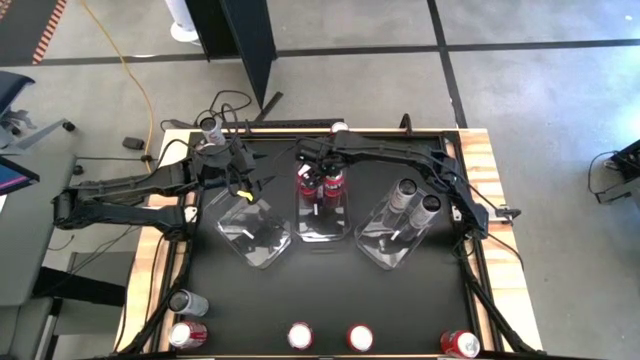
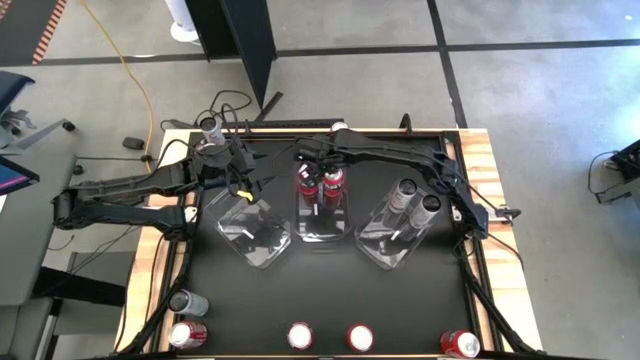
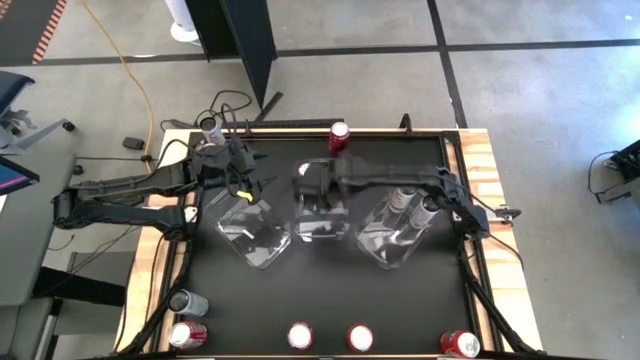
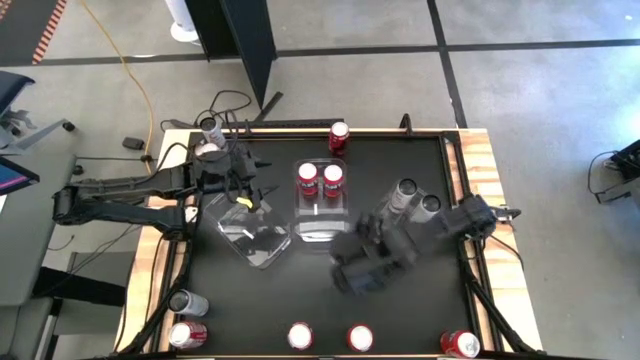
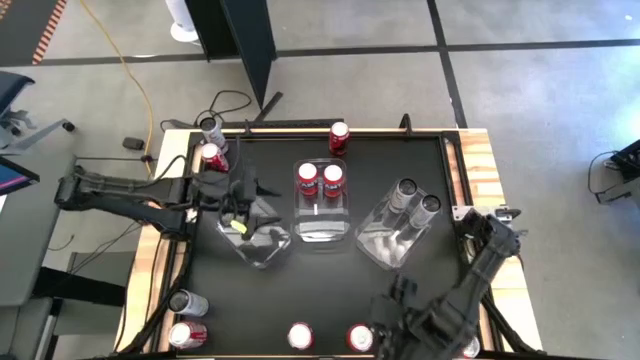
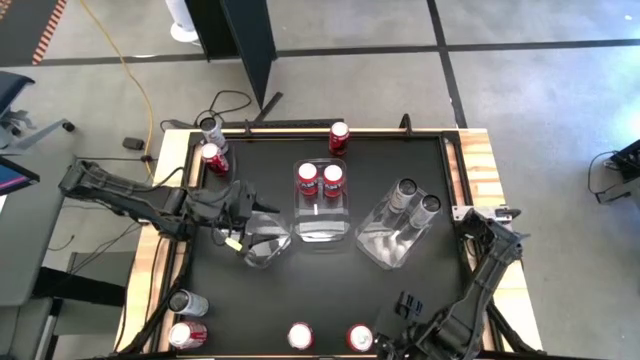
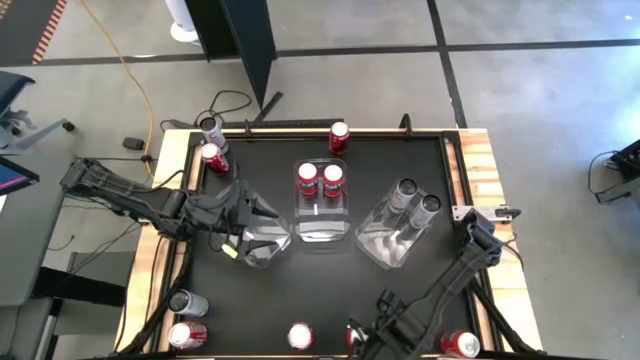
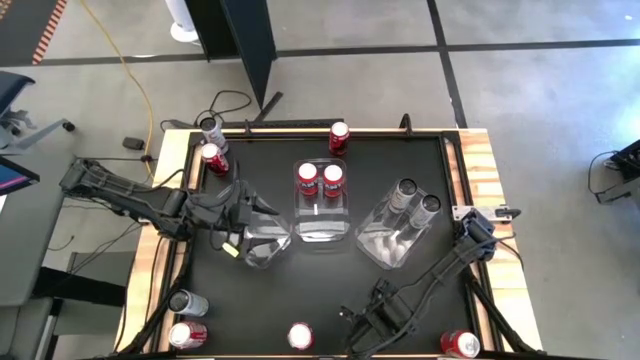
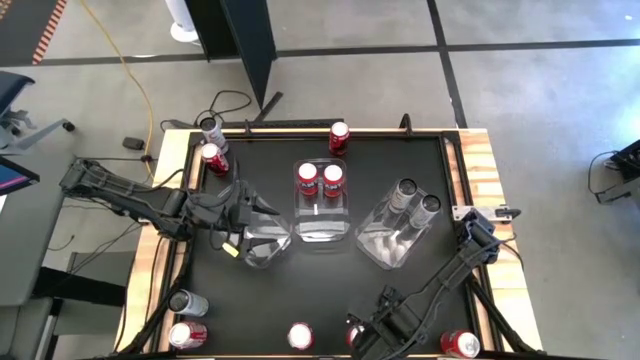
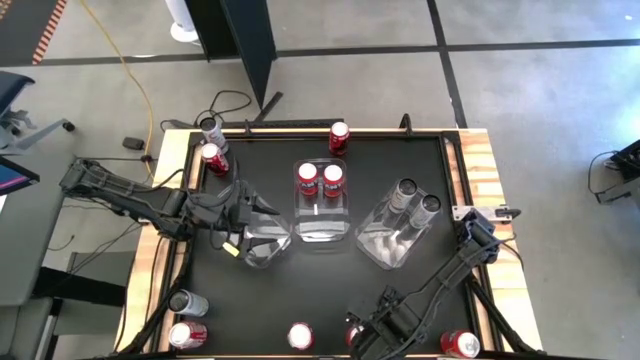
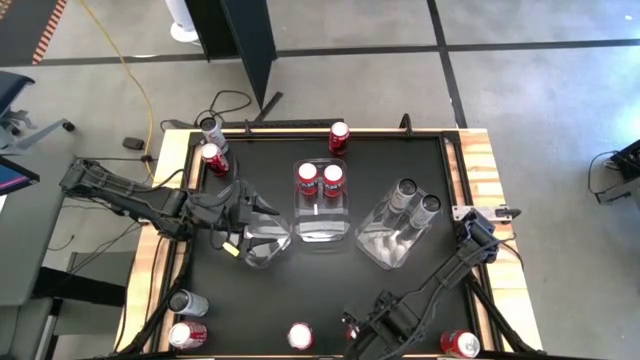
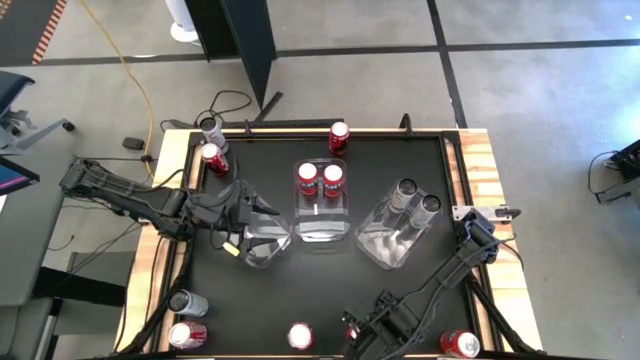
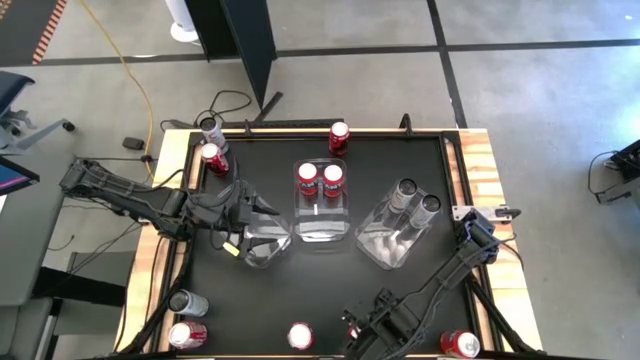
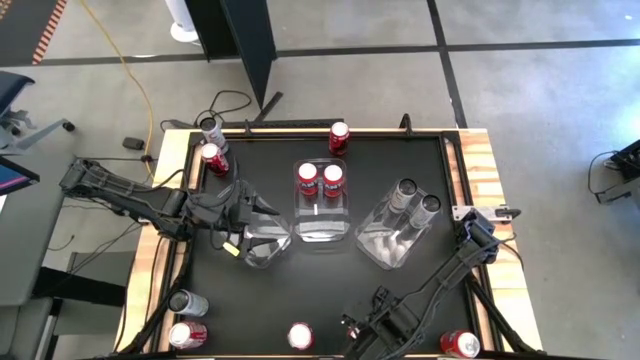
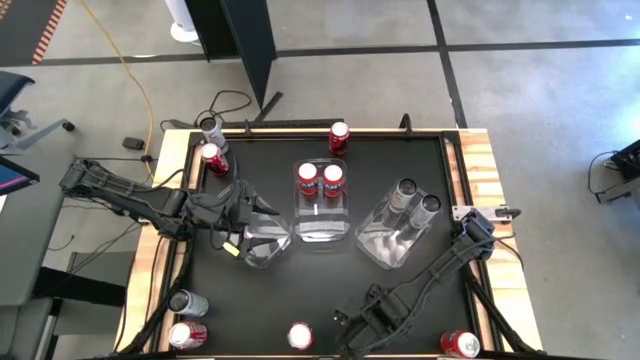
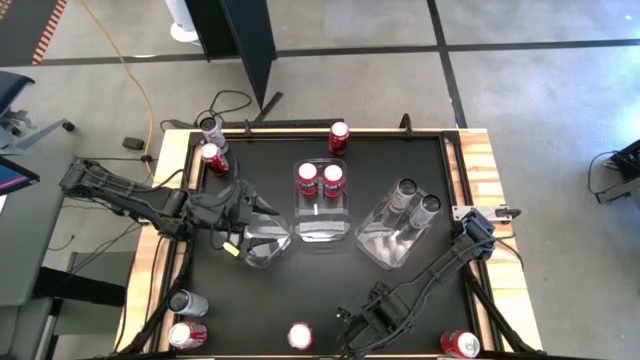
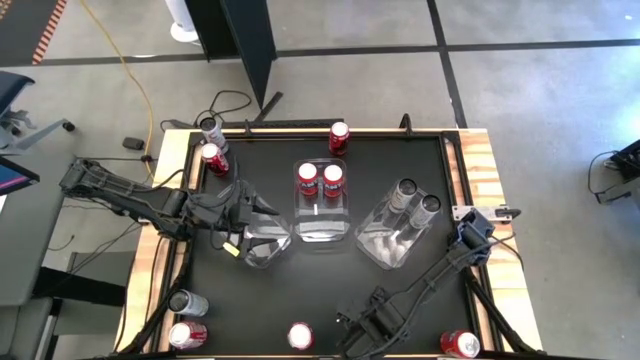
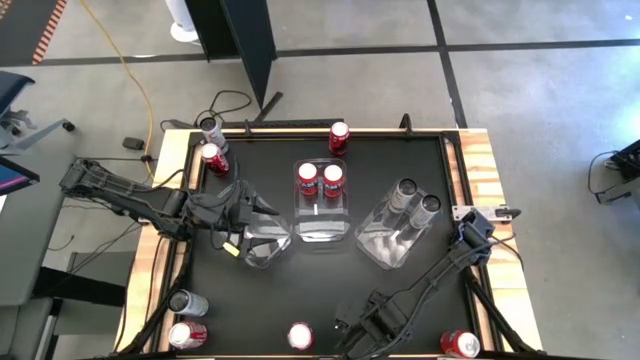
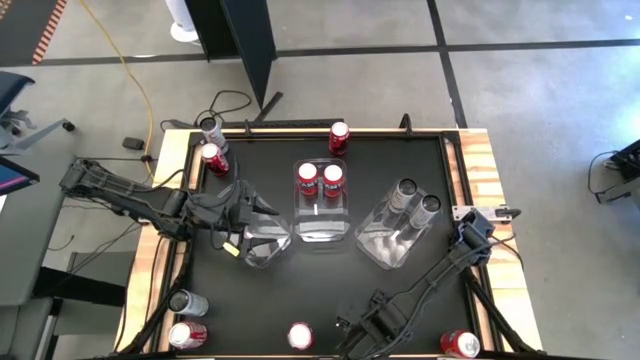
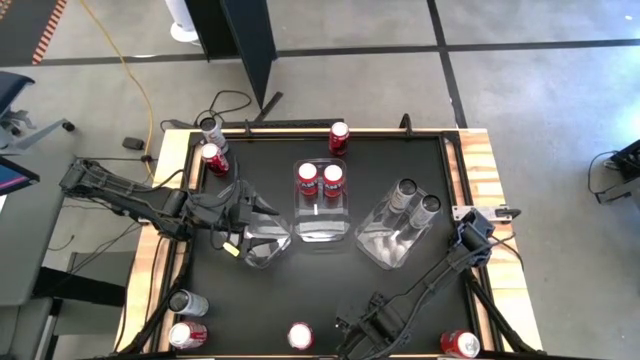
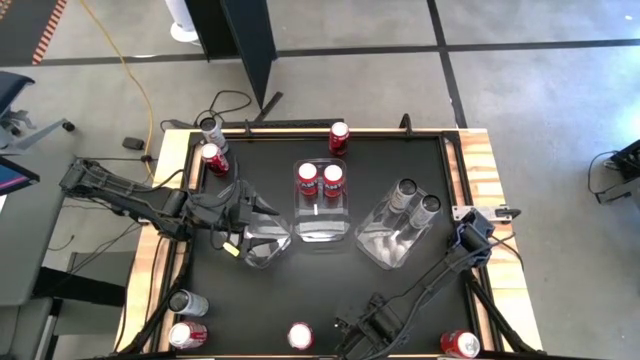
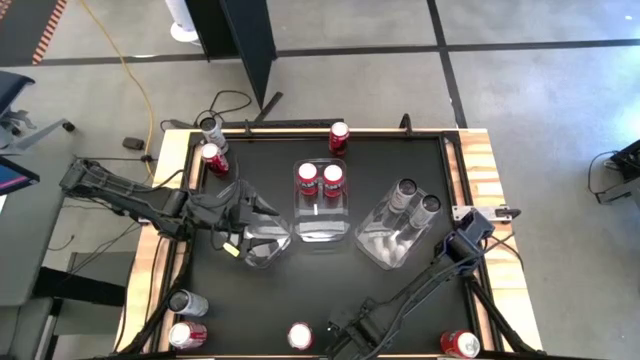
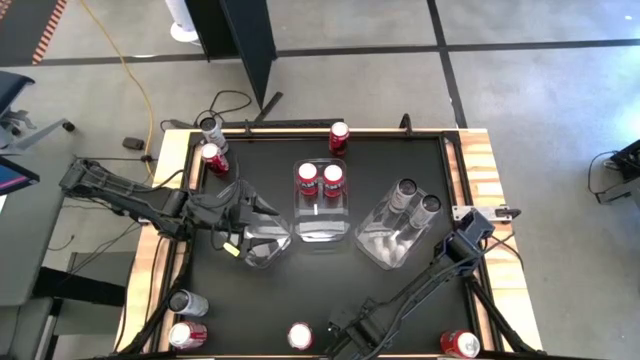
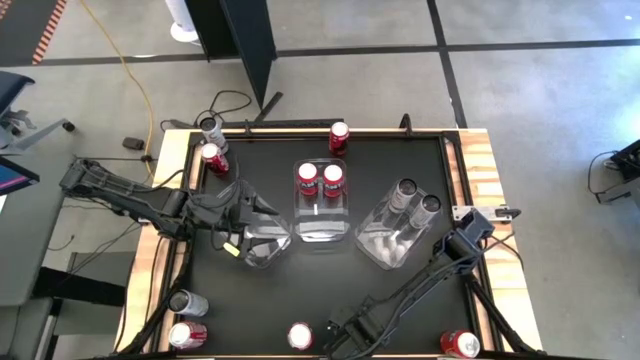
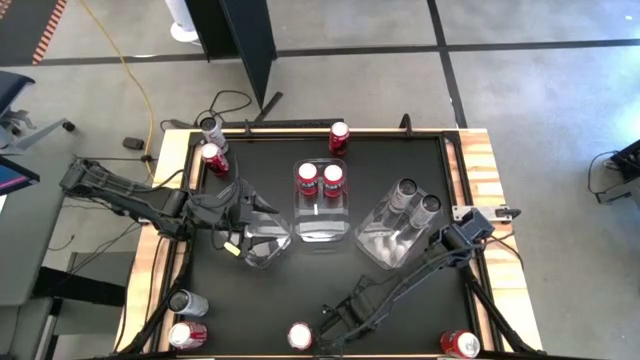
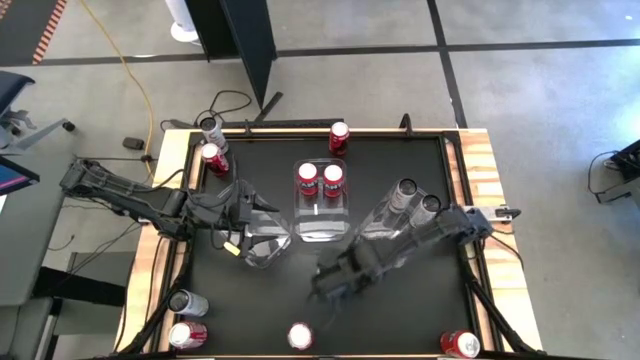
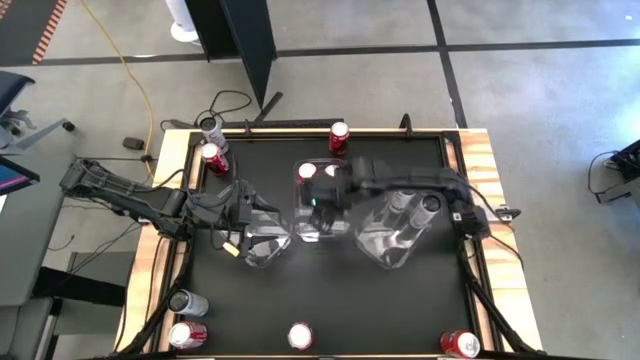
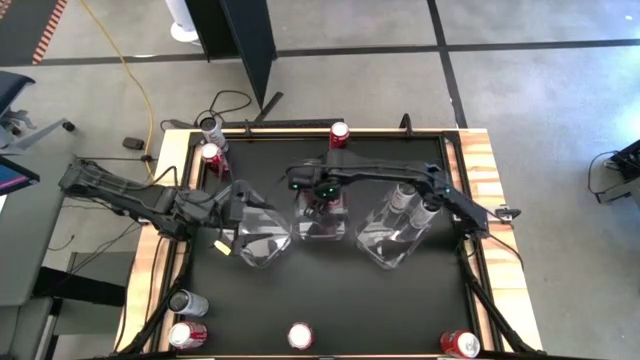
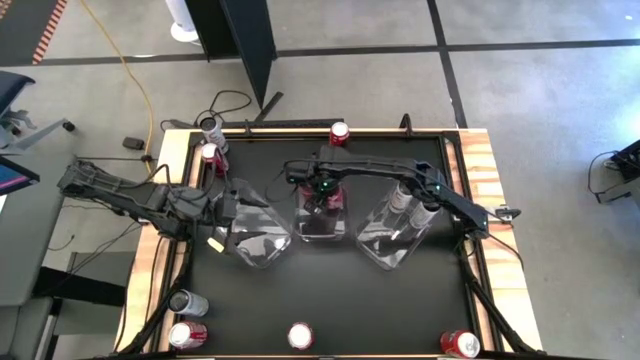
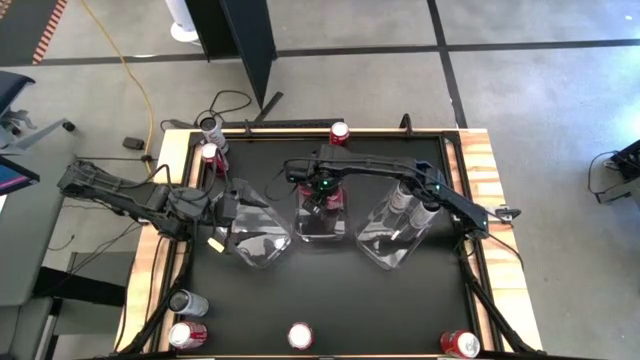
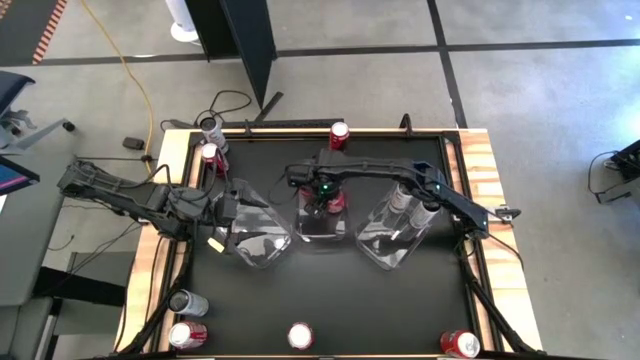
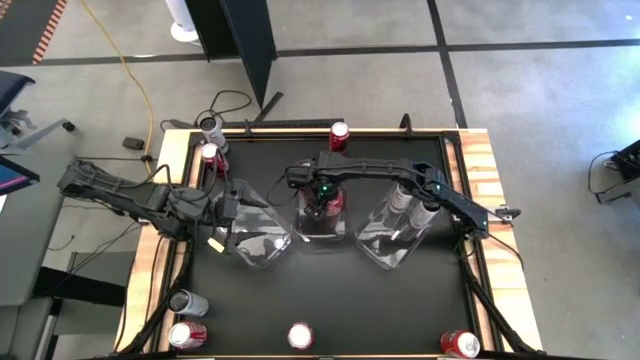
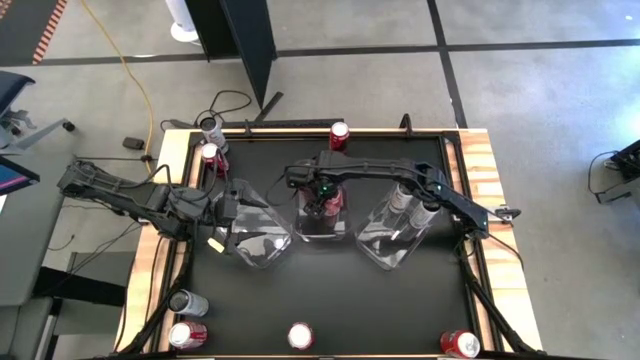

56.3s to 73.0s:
Task: Sort soda cans
Put the bottom center orange soda can into the center transparent bin

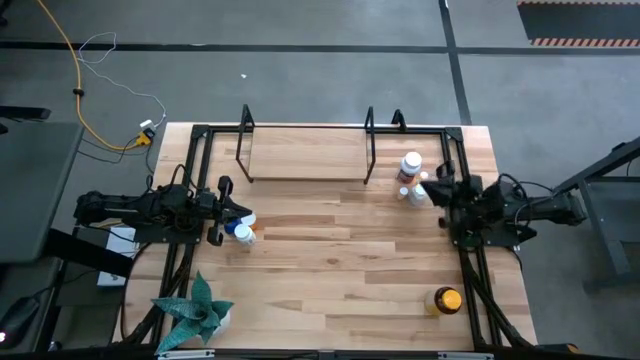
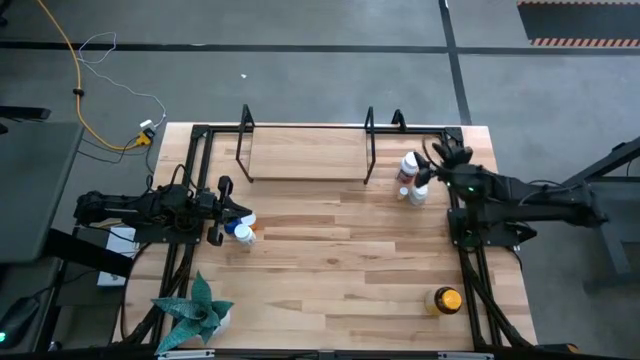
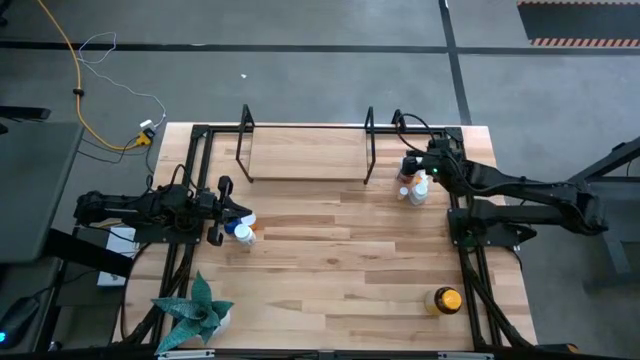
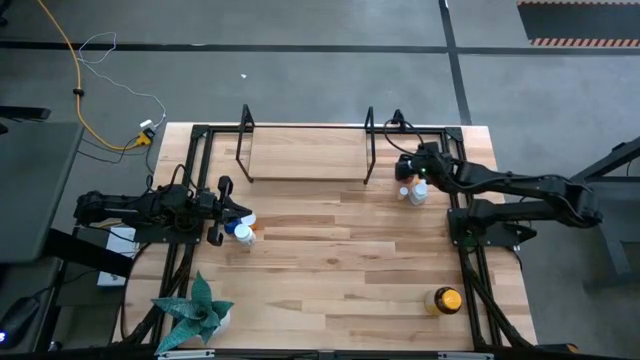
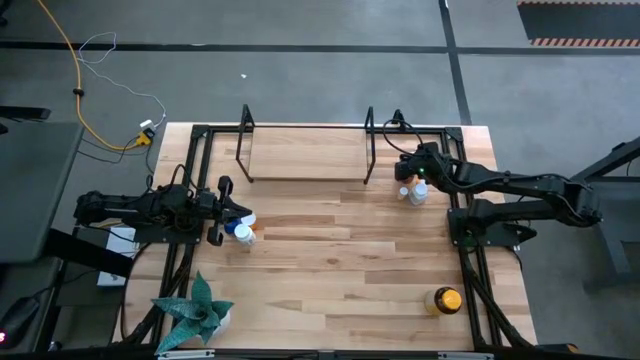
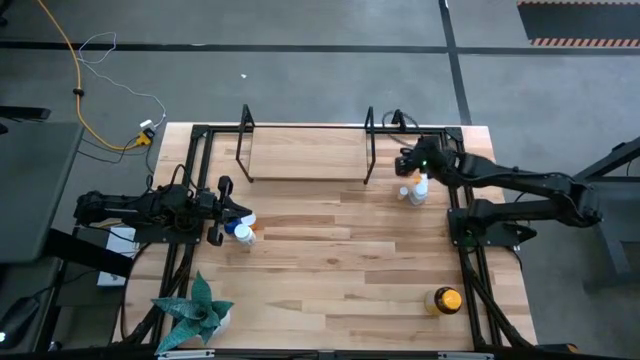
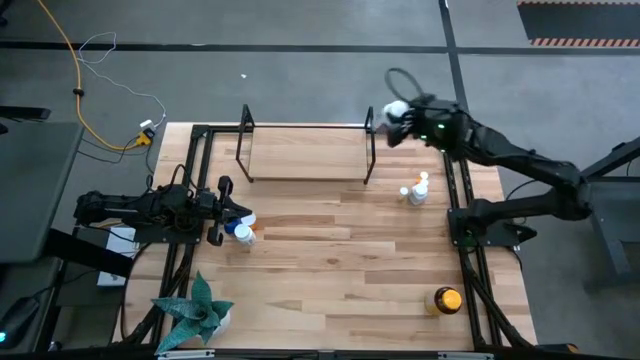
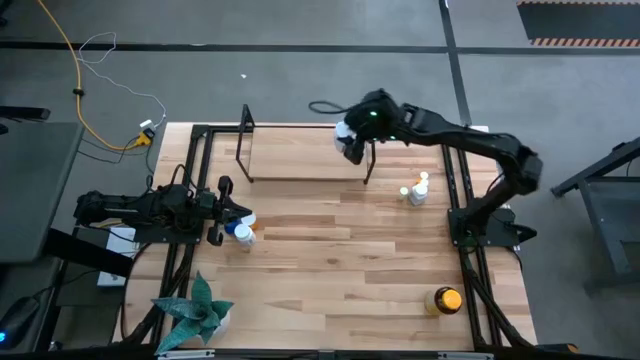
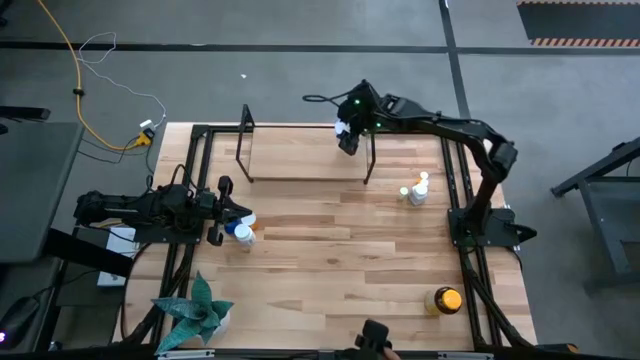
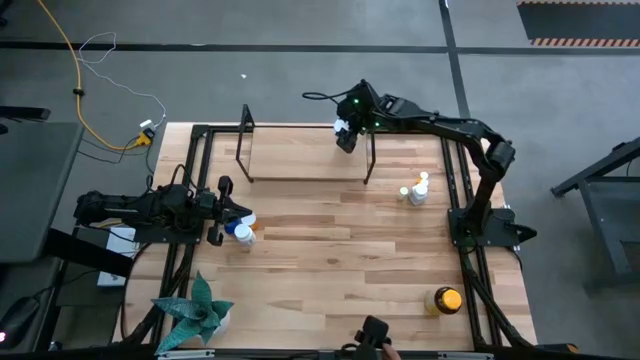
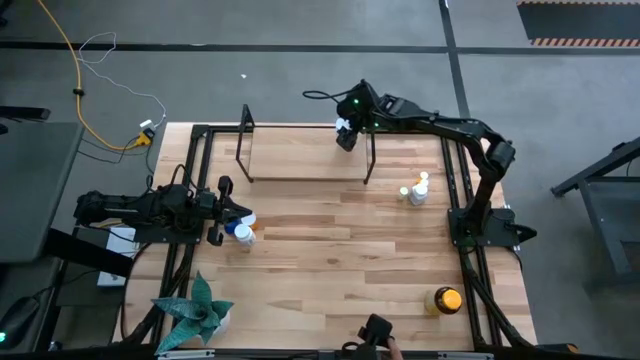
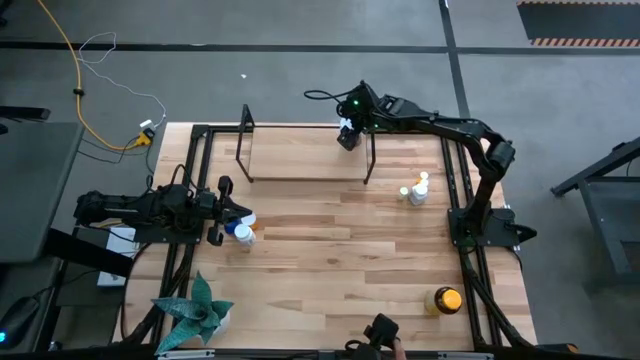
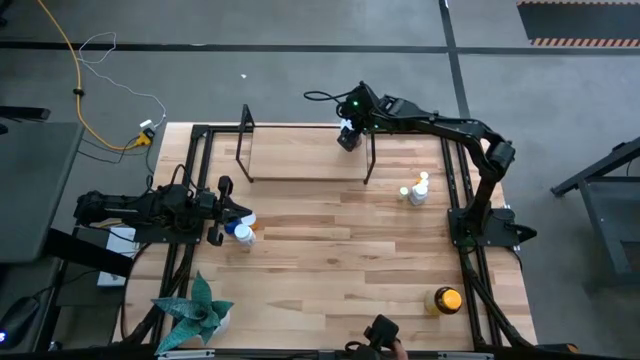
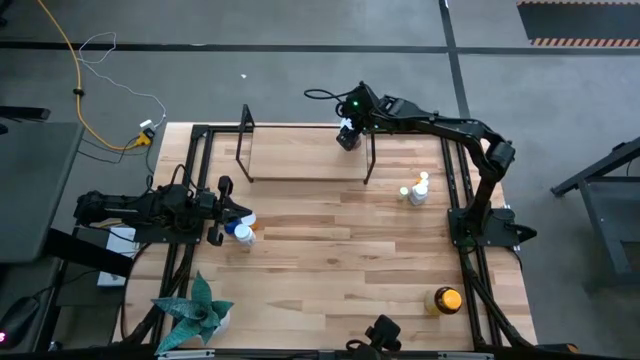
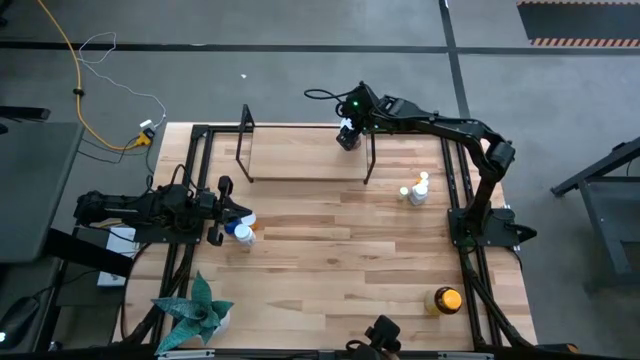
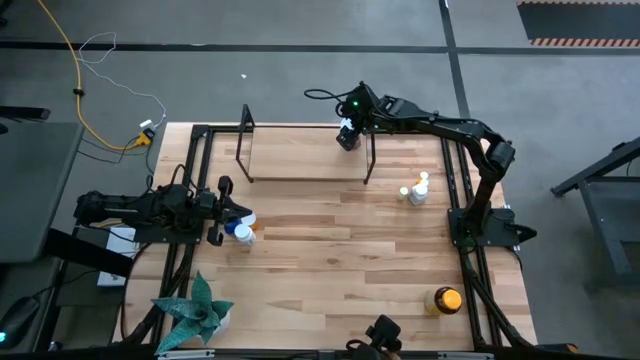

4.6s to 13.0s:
Task: Pick and place medicine bottles onto shelf by color
Put the large white pill bottle on the shelf
